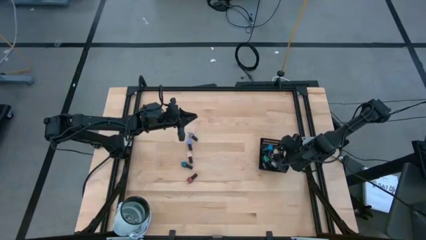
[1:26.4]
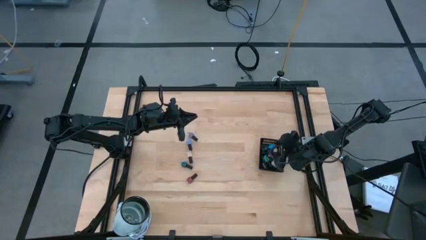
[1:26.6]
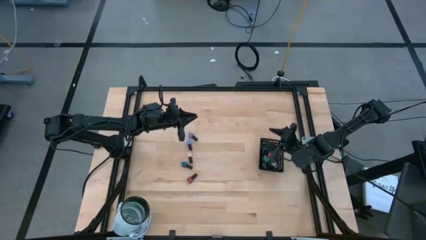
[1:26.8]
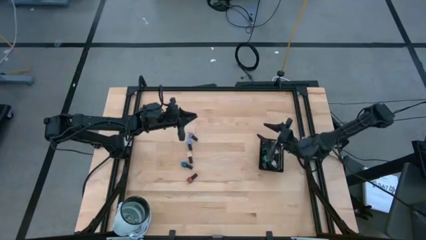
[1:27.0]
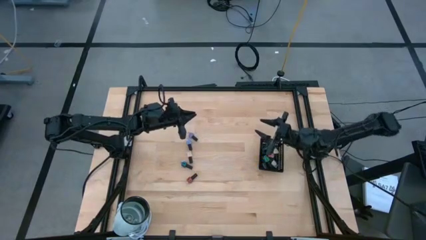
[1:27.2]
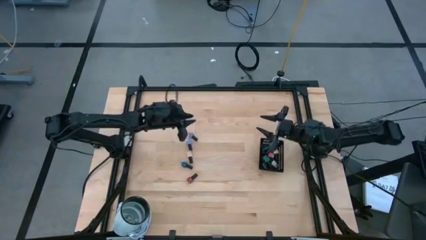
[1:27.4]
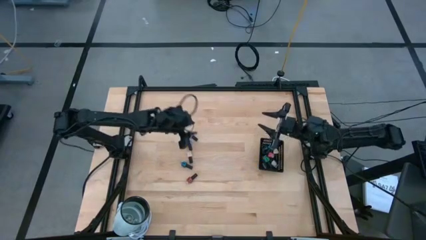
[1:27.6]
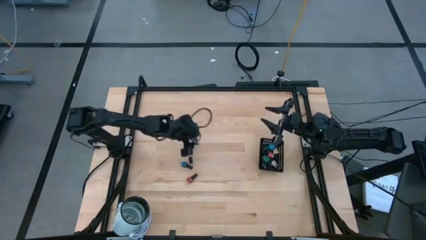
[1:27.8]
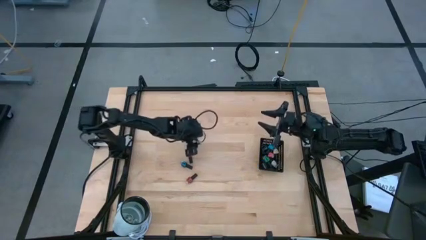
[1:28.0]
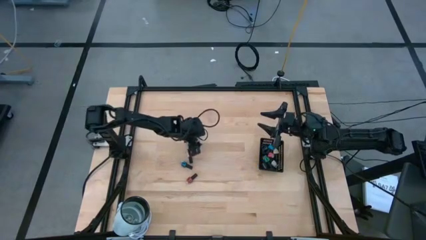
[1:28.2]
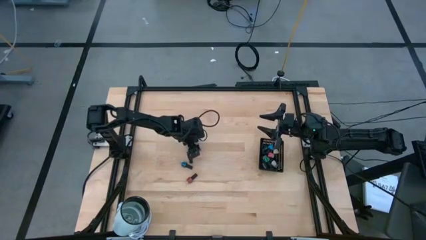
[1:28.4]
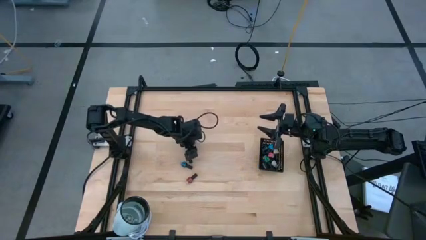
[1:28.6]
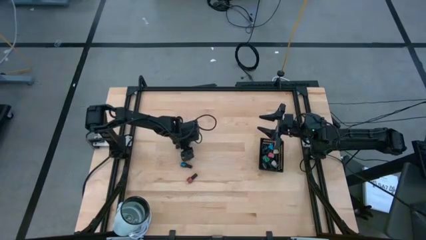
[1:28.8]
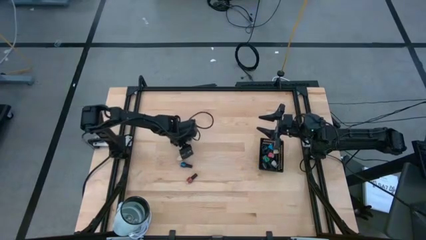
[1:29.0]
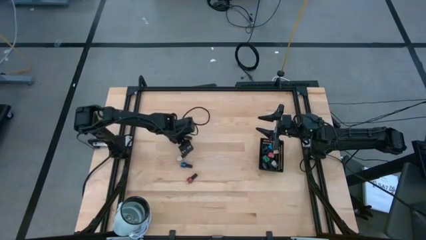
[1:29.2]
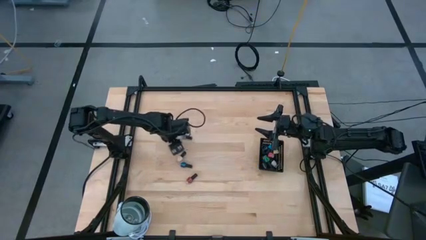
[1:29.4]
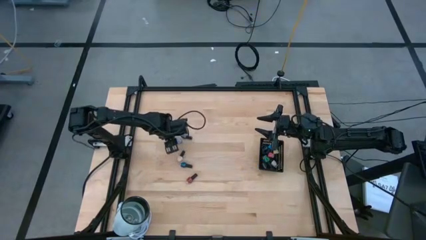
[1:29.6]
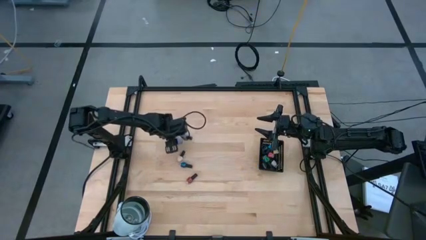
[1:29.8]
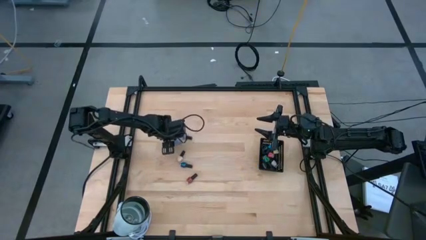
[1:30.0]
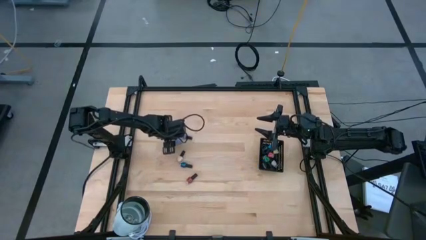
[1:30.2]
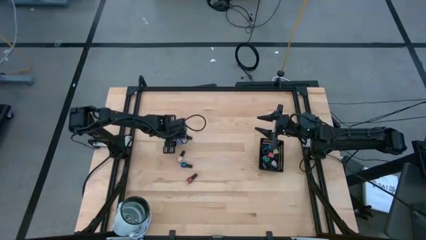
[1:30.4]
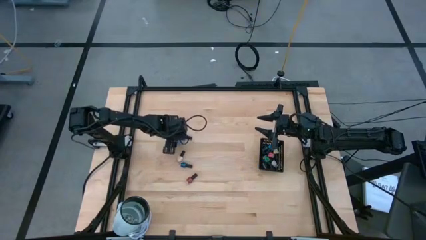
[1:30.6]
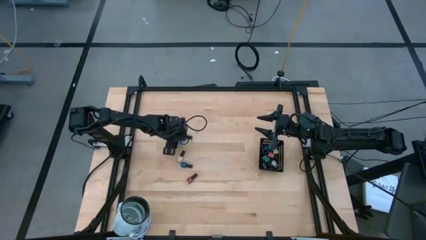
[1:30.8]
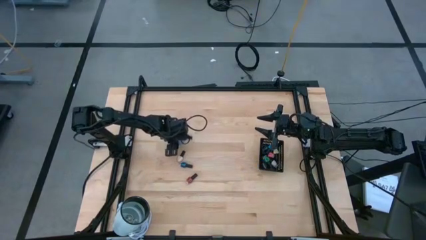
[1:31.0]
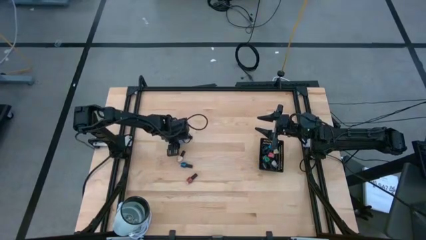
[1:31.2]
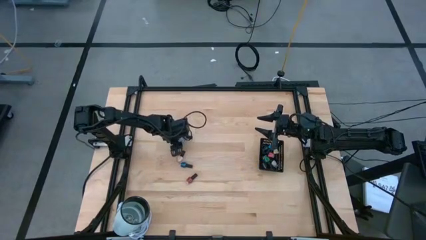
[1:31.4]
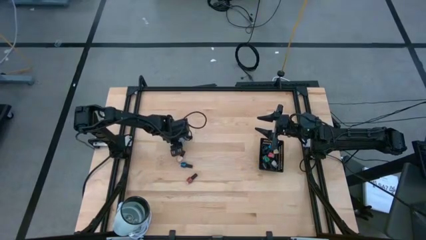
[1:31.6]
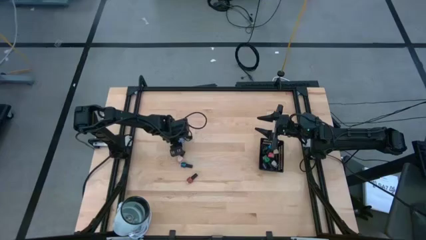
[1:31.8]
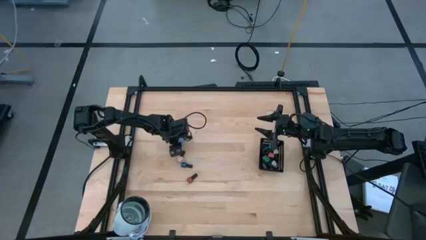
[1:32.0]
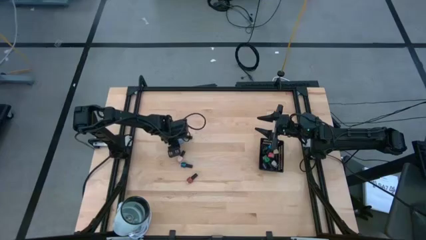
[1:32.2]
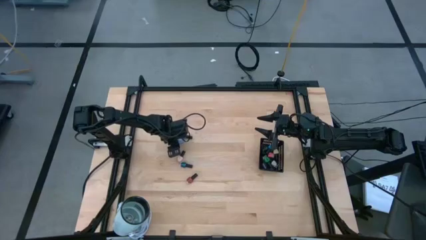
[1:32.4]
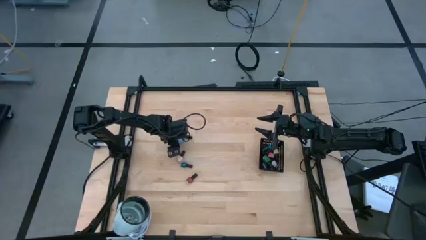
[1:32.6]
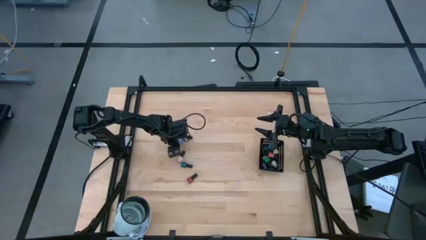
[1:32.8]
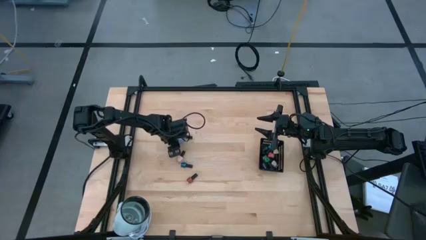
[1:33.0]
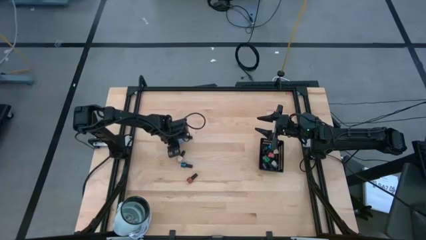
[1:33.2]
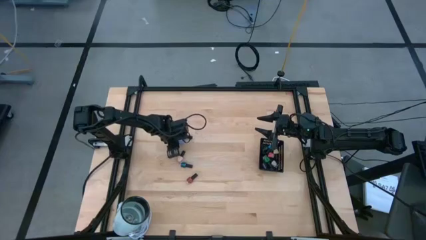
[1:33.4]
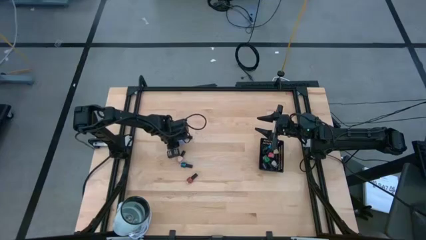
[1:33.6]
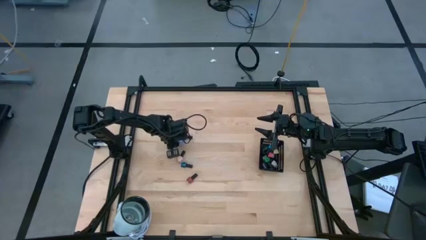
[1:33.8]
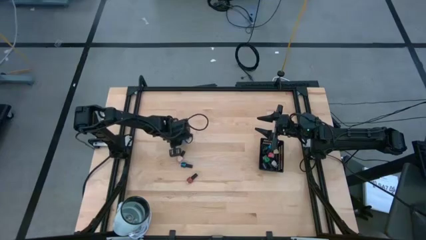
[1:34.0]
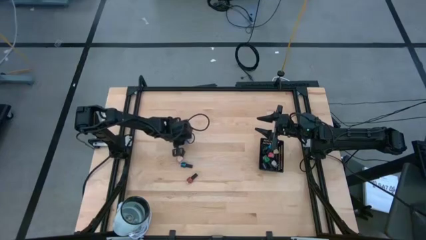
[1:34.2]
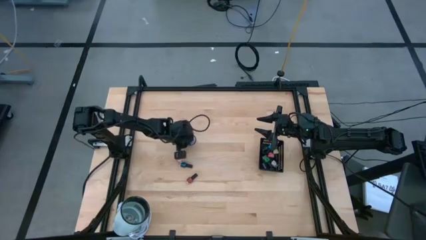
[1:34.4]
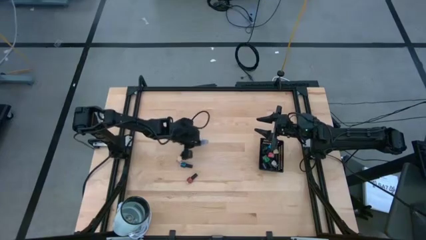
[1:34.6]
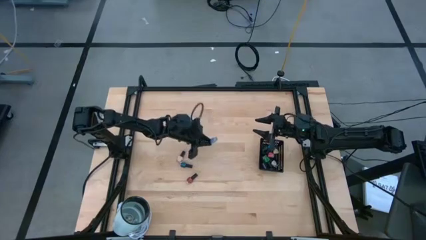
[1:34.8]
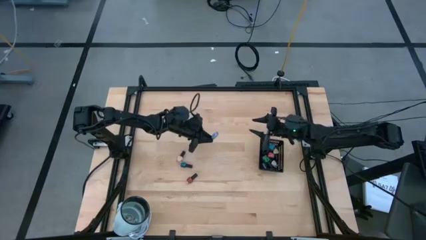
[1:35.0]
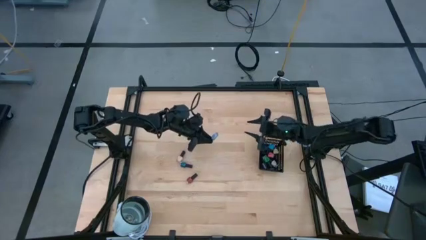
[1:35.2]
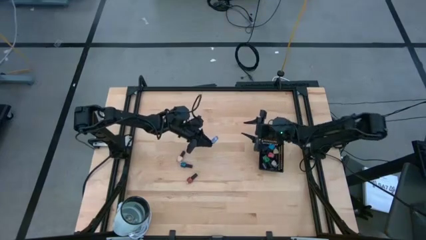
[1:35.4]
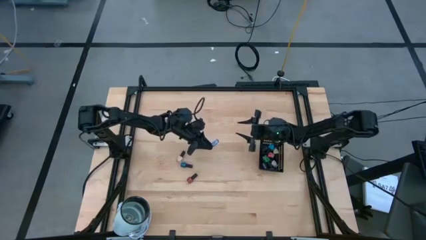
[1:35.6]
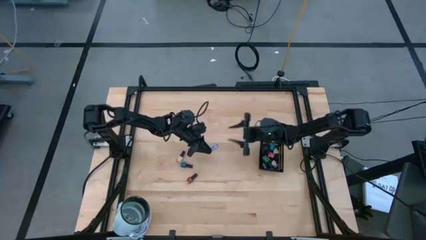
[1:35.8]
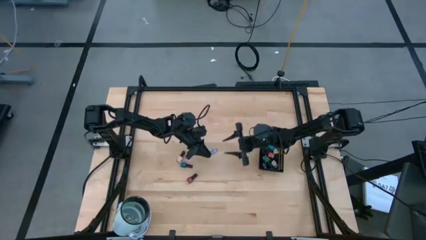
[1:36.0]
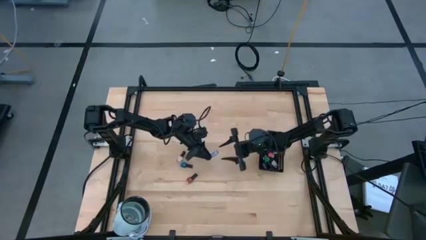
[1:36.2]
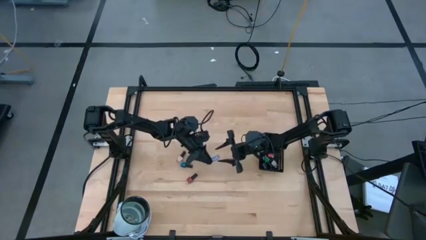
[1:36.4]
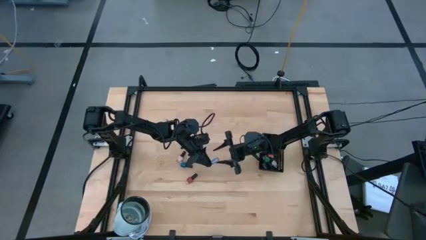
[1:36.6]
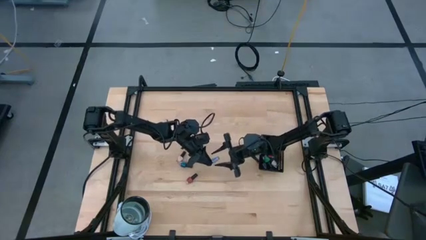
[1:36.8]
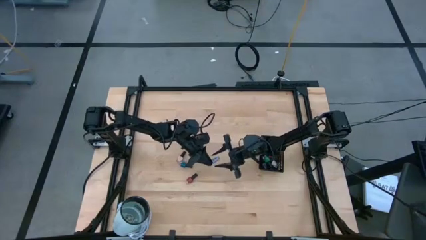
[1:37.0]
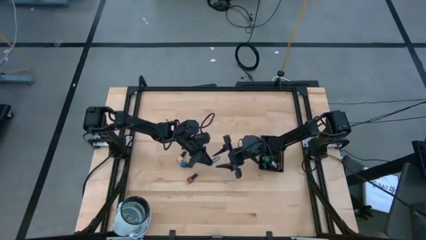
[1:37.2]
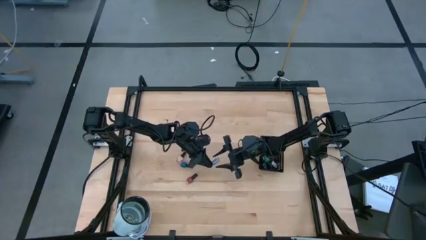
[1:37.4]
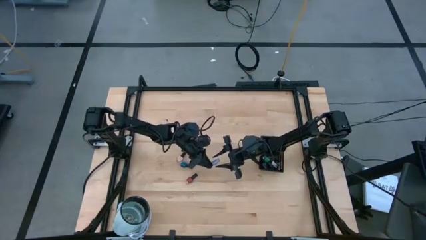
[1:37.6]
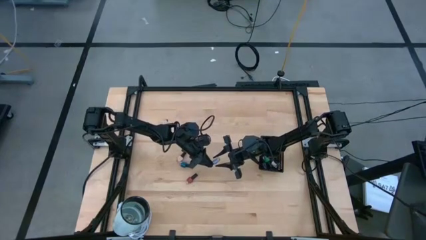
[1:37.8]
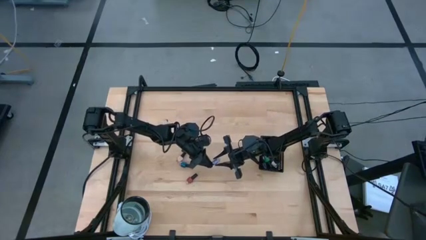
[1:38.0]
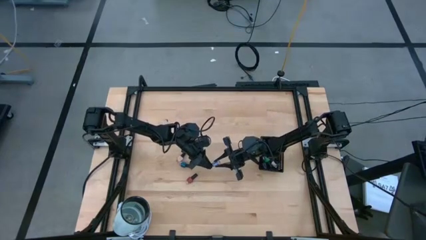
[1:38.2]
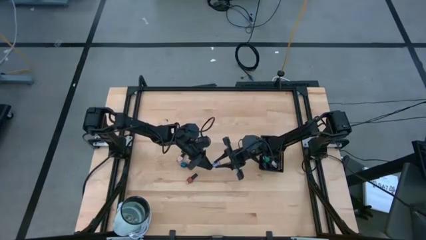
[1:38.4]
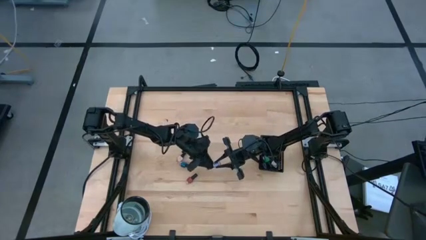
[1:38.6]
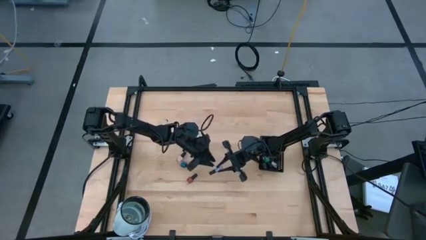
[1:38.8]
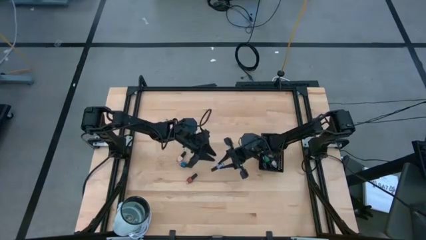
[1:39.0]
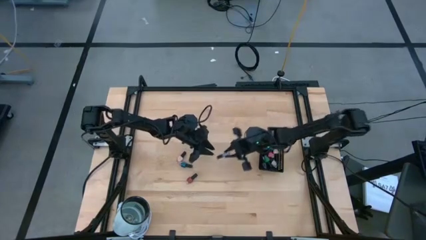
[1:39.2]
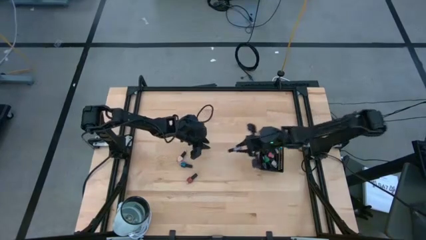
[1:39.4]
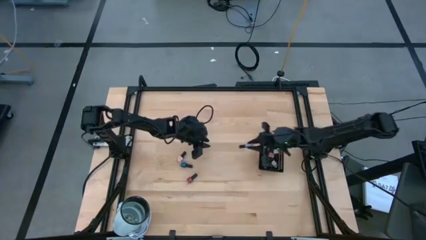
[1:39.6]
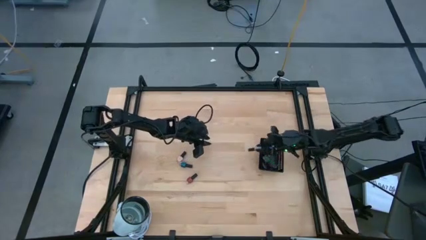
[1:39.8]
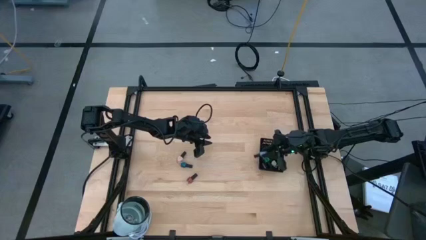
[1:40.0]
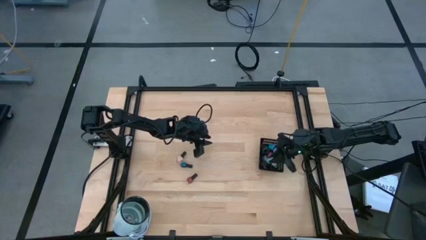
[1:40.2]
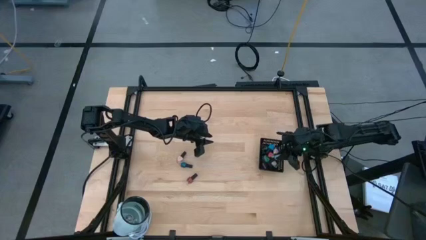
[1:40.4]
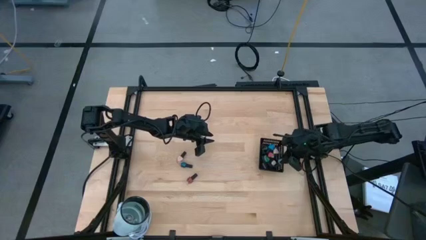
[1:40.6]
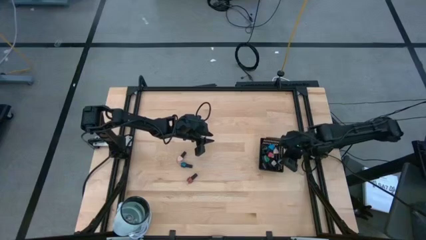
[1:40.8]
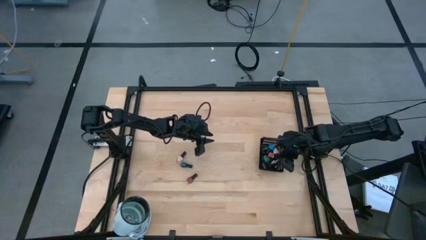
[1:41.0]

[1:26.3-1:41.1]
Task: Pick & Place Nail Polish
Put the light blue nail polish into the black basket
